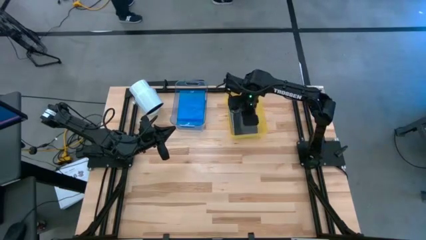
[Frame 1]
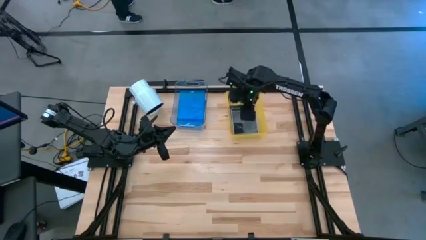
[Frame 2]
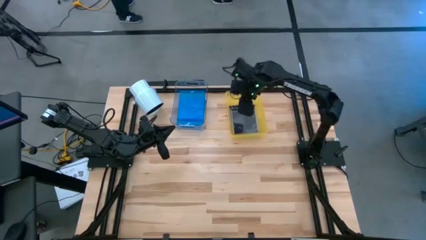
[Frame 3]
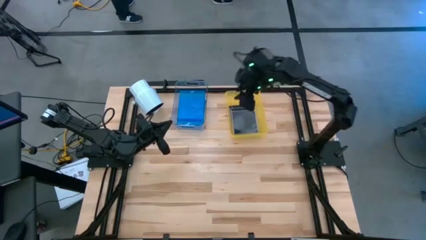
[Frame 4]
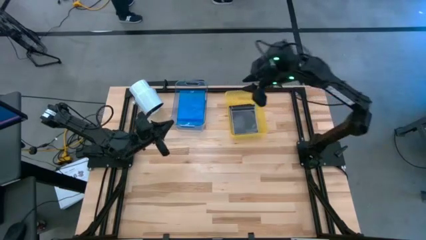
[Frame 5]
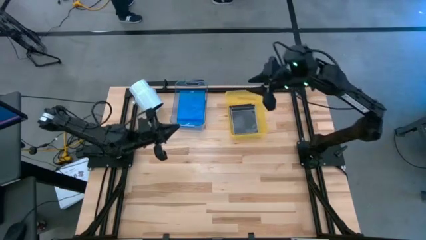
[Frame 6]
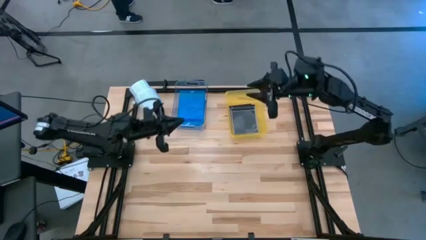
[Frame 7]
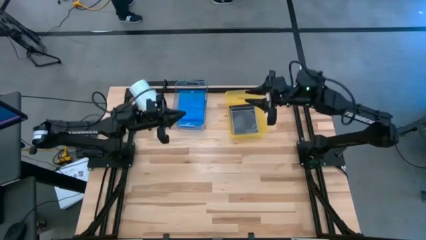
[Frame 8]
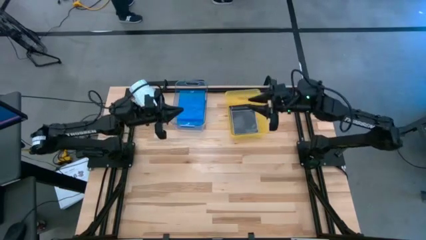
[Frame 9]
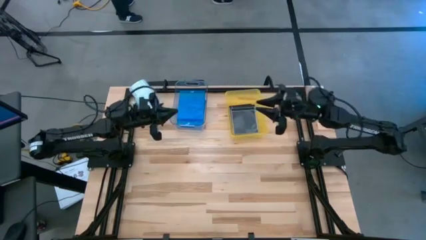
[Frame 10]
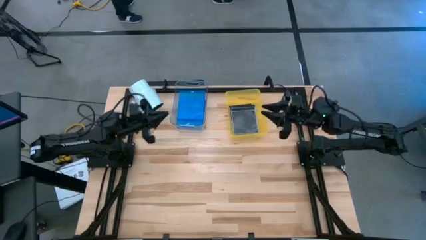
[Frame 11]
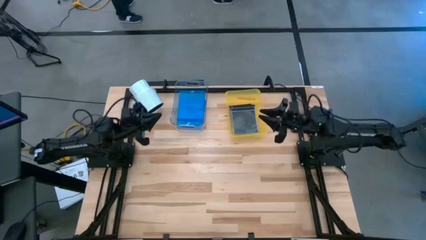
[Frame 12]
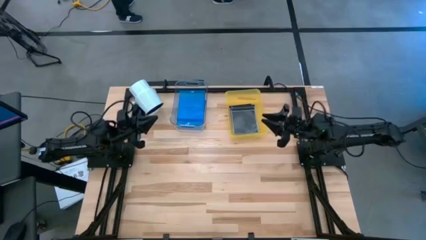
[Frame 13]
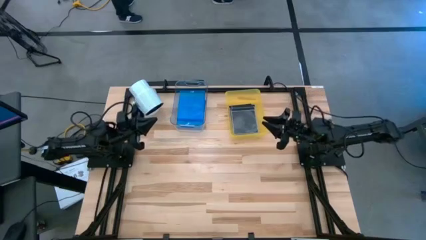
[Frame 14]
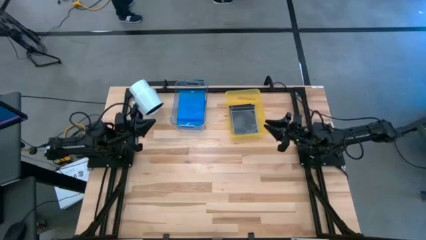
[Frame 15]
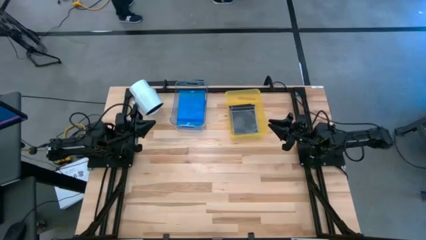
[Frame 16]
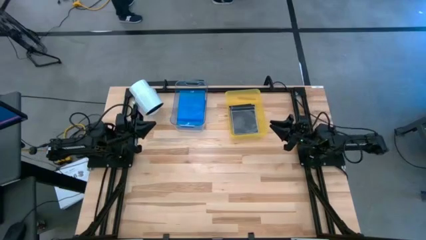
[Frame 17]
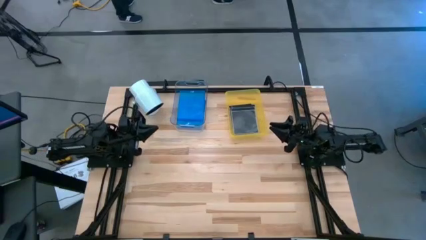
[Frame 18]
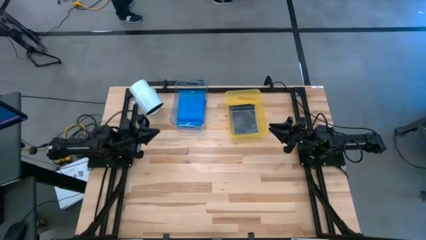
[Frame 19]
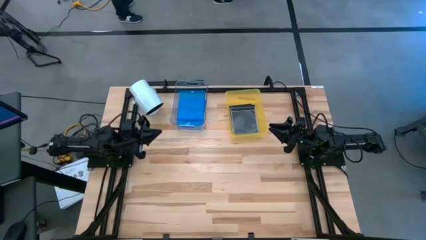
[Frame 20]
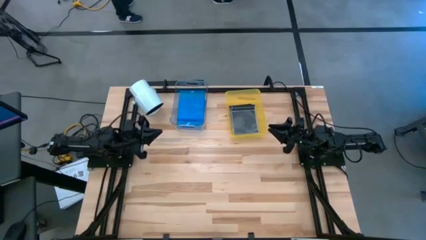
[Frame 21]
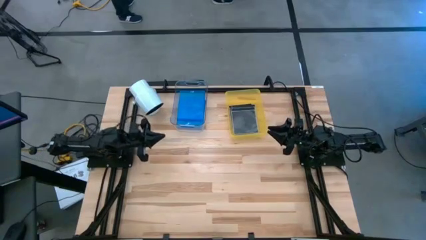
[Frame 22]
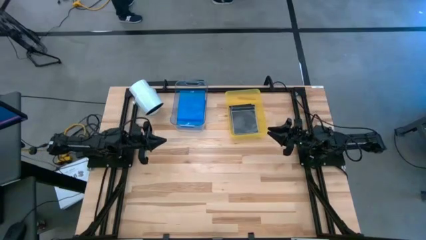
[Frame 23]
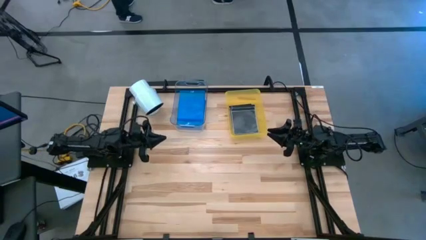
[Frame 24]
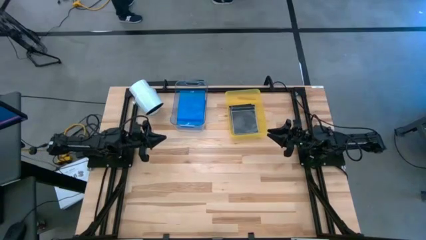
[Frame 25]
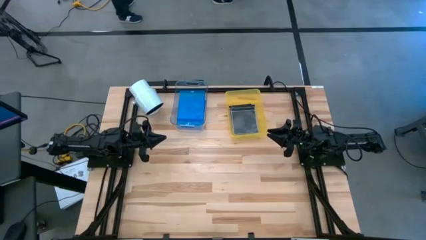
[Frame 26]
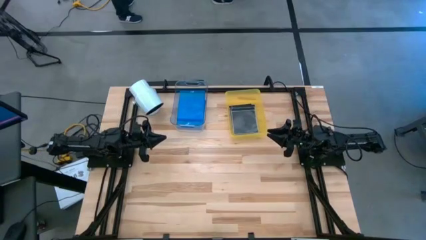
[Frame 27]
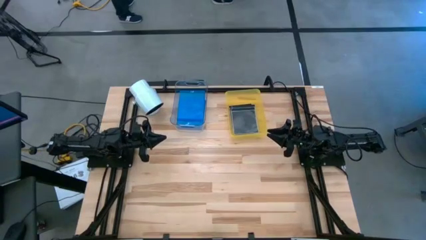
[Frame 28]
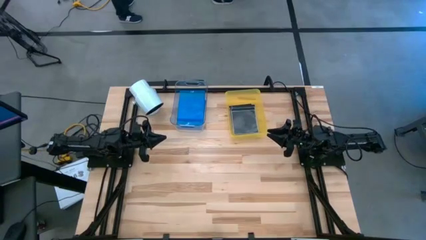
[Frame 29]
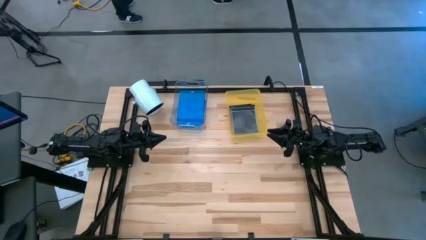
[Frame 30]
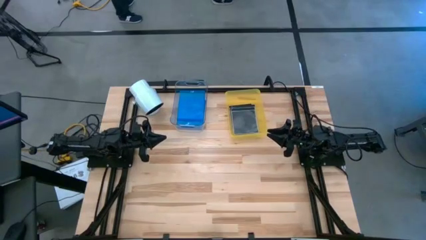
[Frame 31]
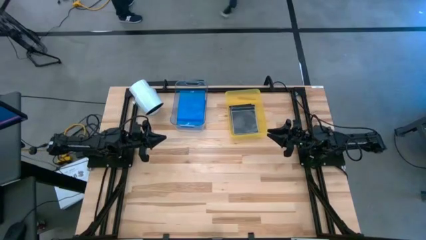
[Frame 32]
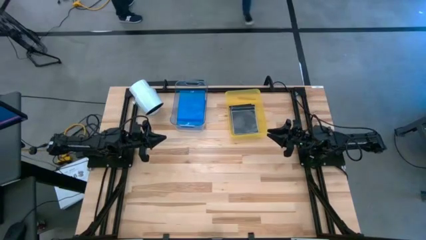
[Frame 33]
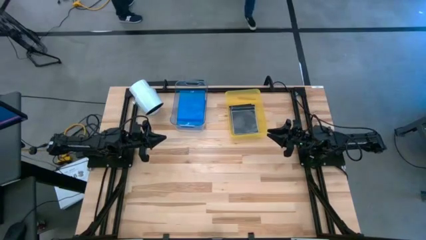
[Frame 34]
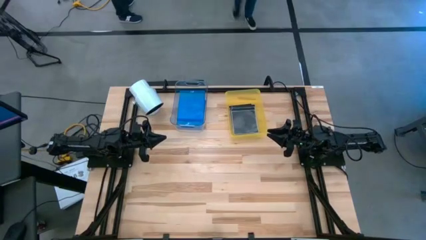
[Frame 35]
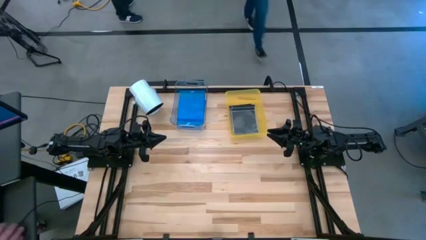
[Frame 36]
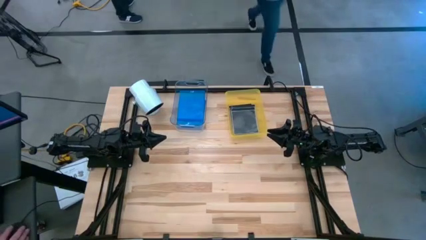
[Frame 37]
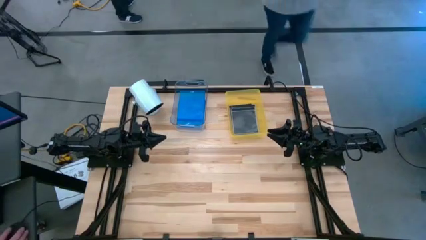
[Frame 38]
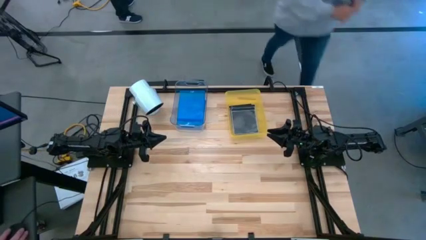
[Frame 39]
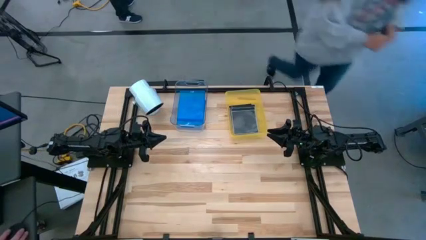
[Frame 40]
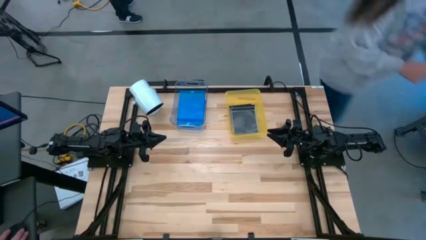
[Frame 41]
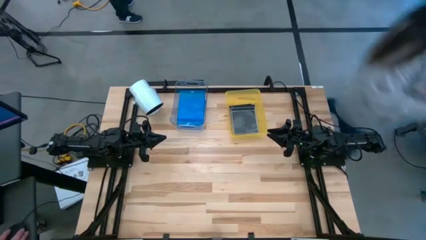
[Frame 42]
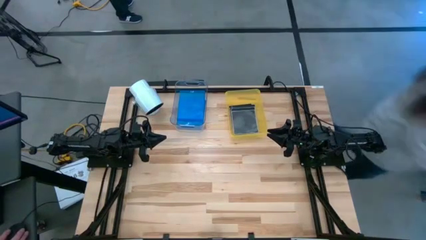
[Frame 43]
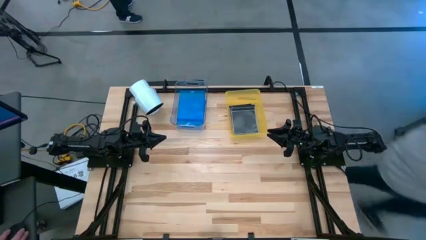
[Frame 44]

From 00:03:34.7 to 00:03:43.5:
Task: Pick & place jewel cases by type
Return to Home Position

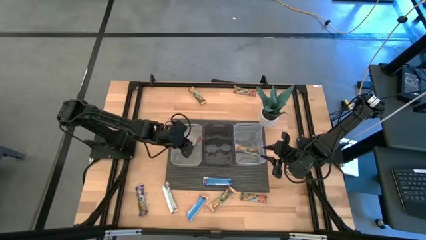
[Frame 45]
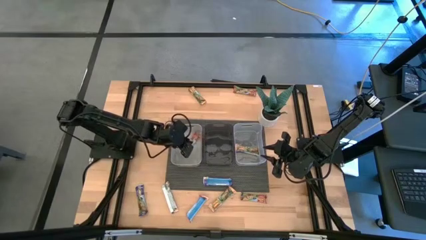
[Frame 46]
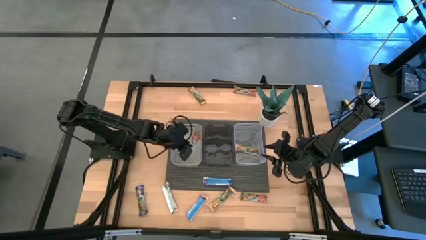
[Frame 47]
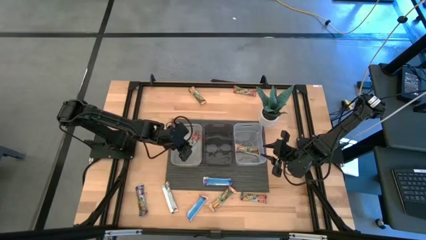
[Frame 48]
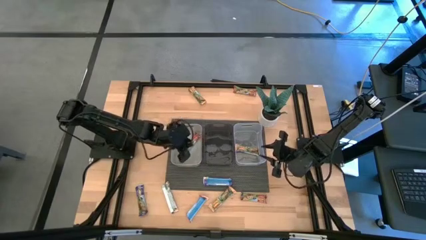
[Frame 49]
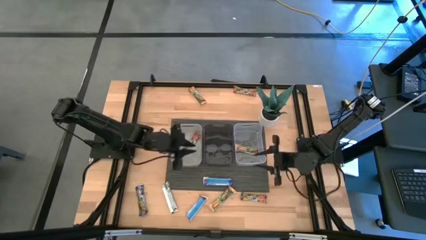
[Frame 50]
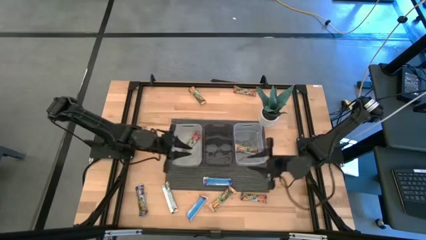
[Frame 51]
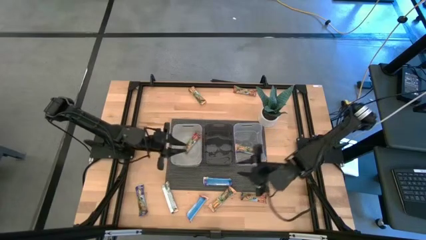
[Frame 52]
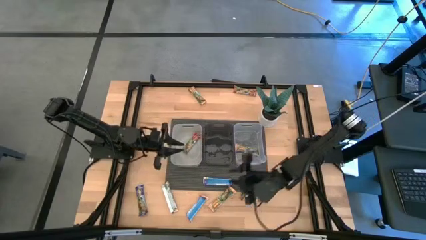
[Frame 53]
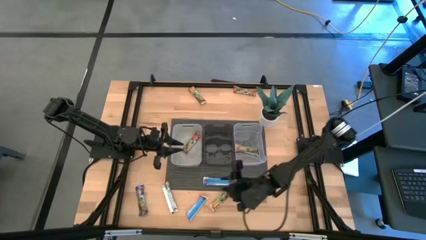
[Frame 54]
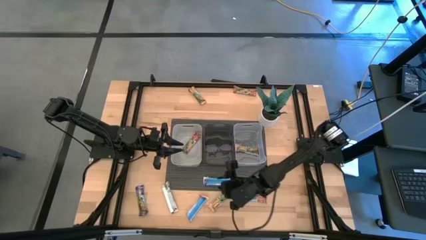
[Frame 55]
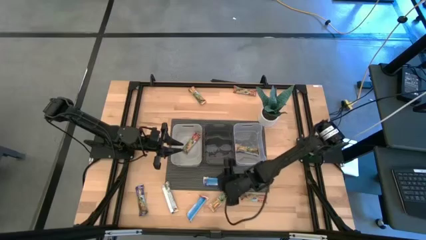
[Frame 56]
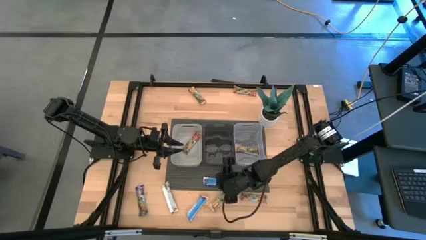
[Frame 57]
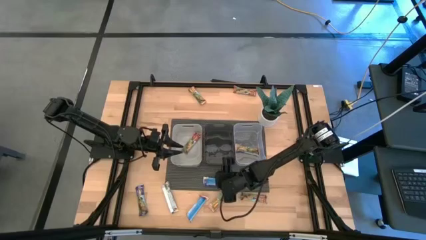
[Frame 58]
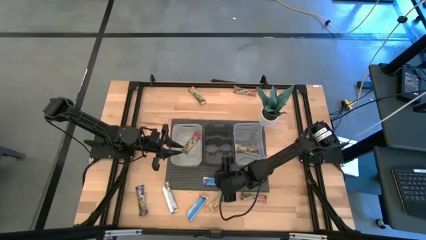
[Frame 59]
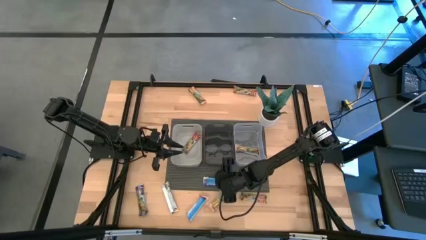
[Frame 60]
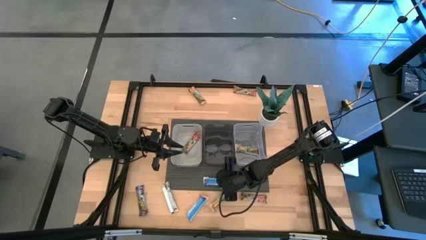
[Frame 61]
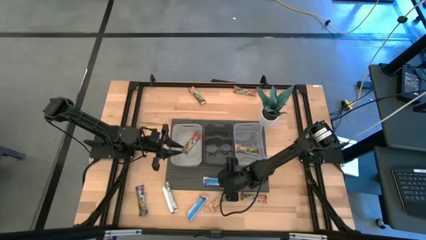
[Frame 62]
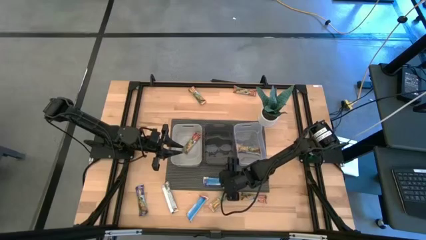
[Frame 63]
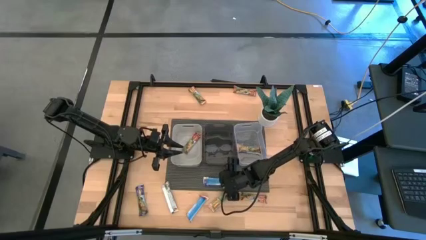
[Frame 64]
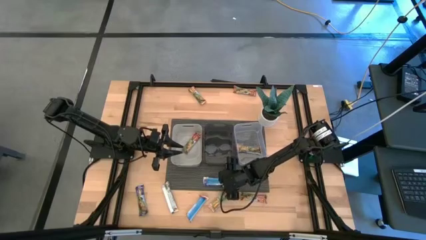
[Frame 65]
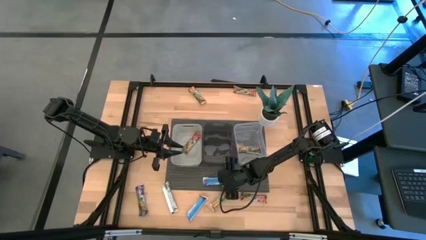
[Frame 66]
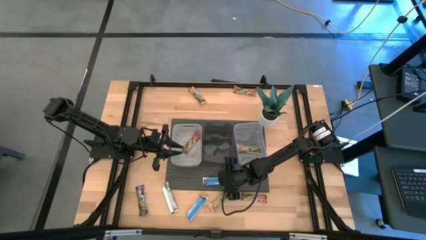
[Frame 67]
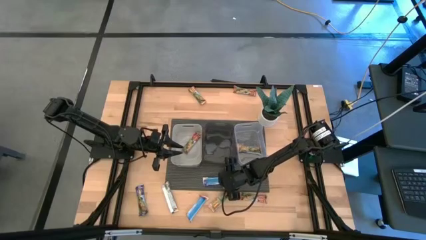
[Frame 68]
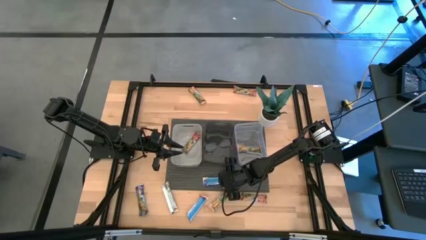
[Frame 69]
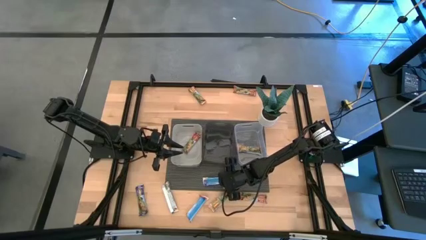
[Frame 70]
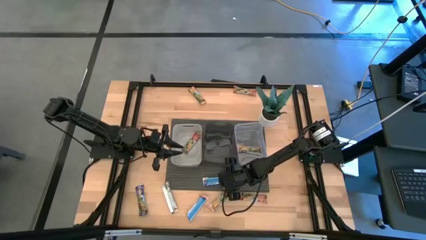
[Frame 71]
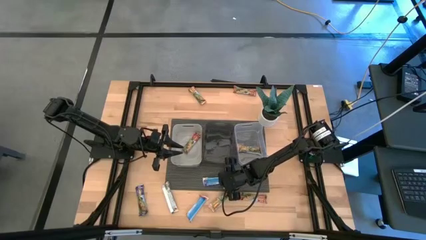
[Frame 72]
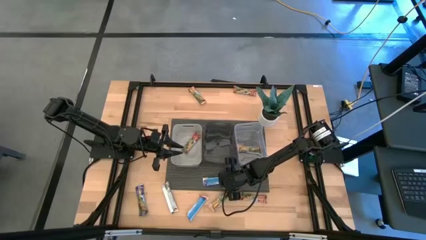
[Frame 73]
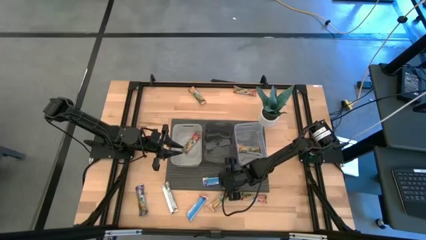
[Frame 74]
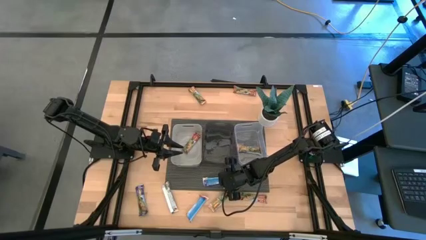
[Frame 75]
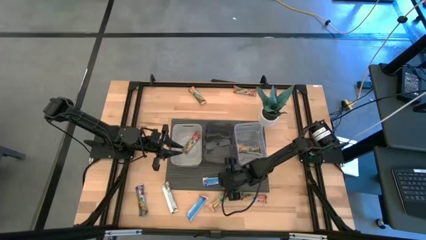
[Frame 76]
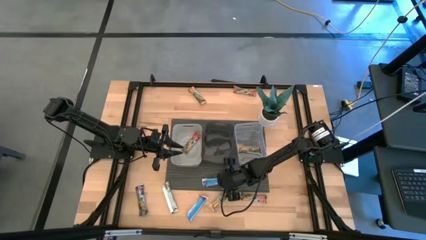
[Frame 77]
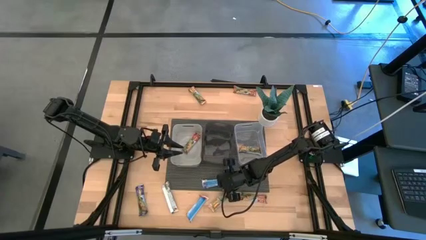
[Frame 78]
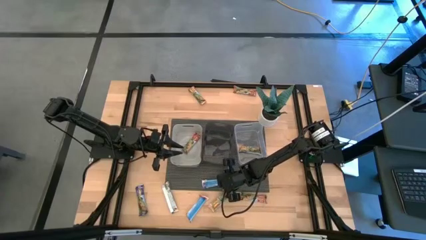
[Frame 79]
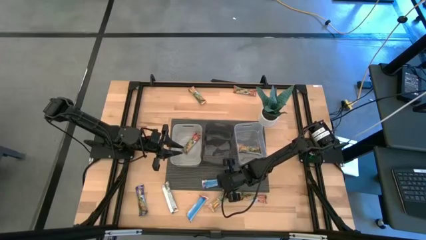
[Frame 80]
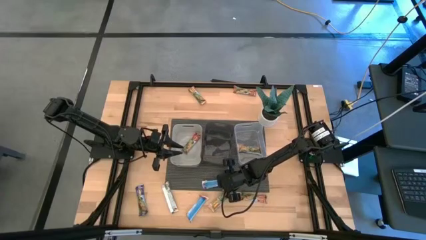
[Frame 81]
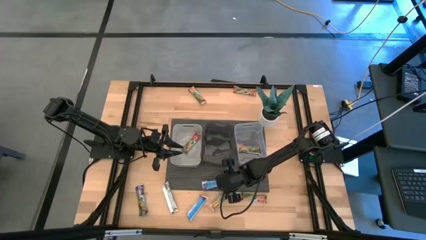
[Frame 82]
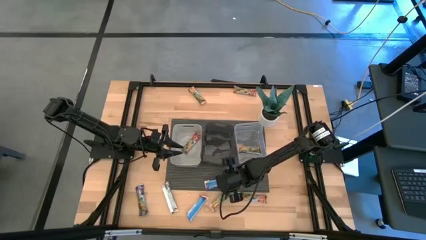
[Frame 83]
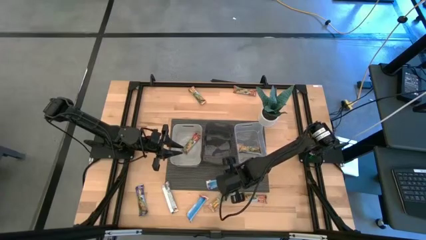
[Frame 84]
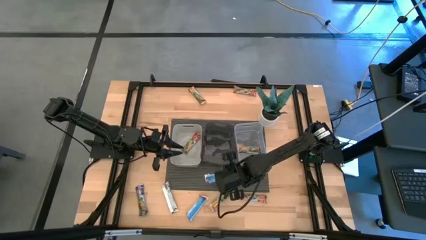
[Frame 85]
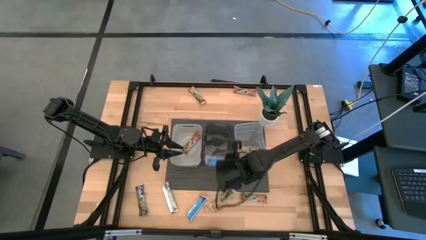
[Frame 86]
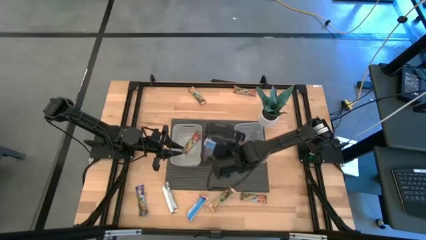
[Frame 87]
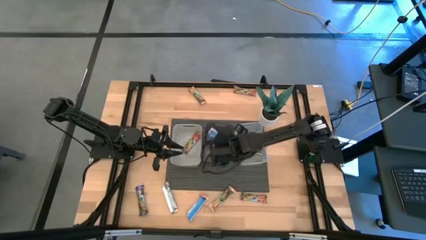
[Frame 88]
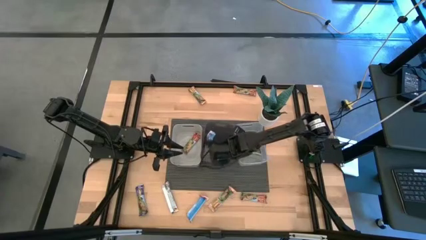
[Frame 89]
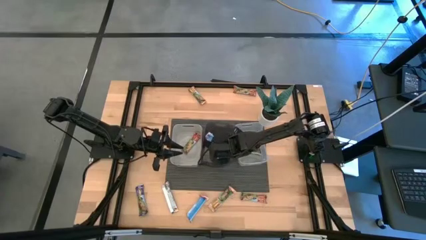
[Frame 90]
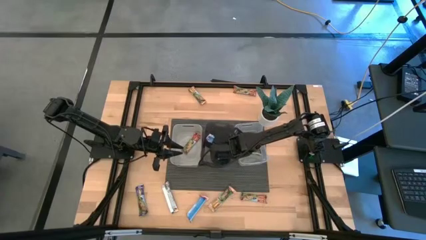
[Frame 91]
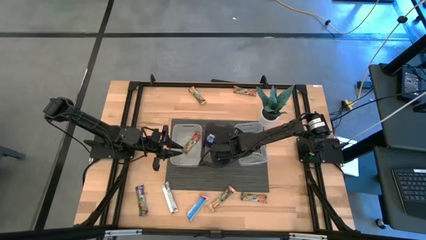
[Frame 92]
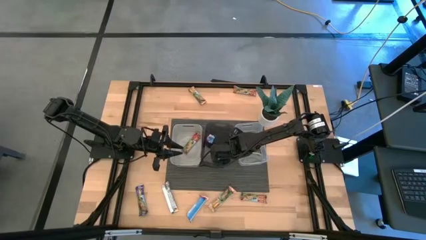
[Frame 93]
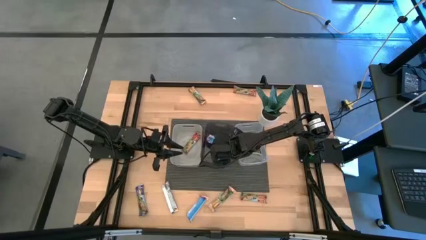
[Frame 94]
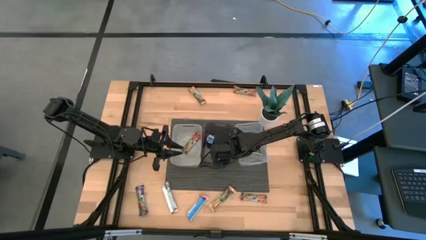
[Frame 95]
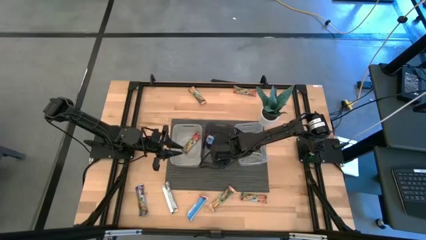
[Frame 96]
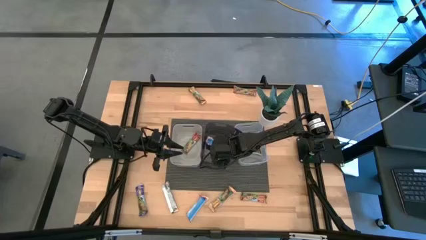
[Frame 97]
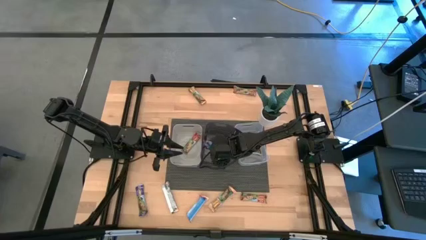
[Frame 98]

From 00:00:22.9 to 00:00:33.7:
Task: Pick and place Granola Bars by type
Put the blue granola bar into the black bin
